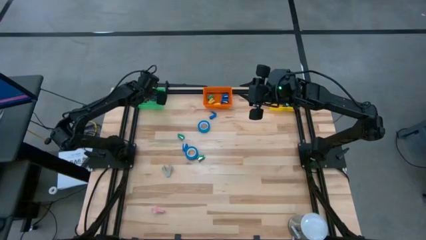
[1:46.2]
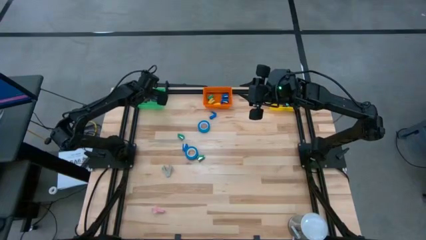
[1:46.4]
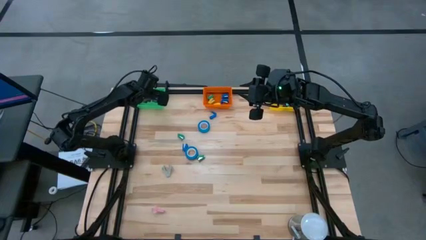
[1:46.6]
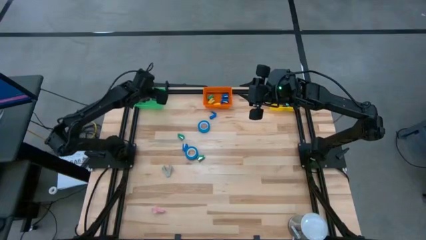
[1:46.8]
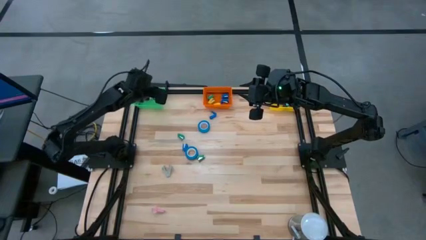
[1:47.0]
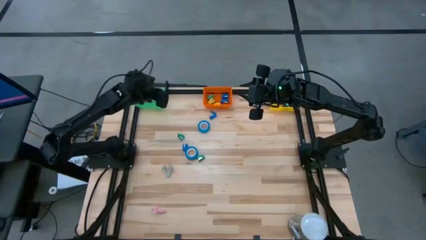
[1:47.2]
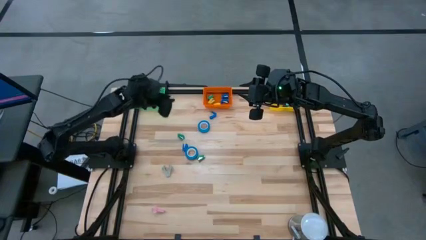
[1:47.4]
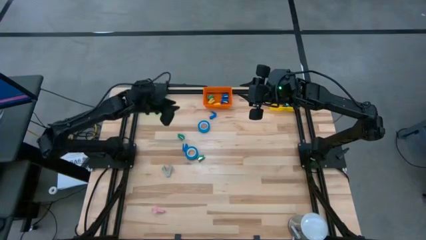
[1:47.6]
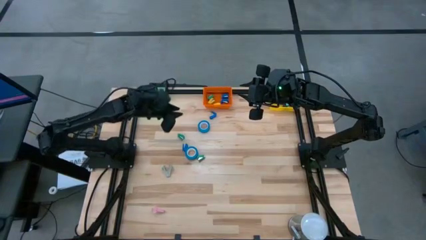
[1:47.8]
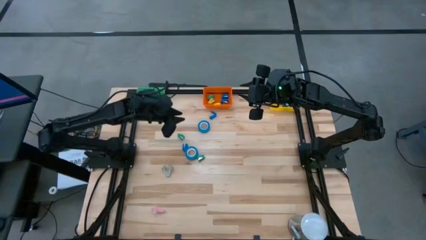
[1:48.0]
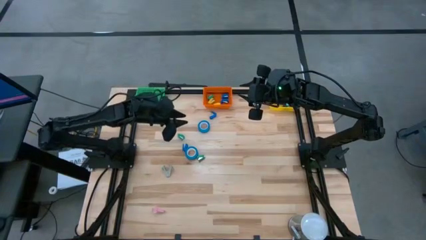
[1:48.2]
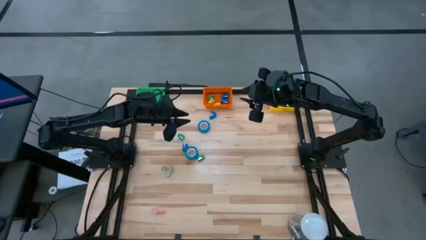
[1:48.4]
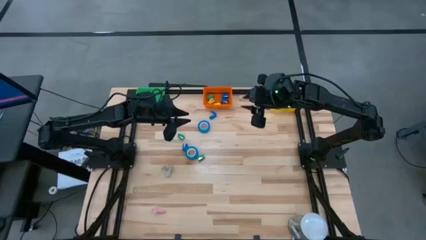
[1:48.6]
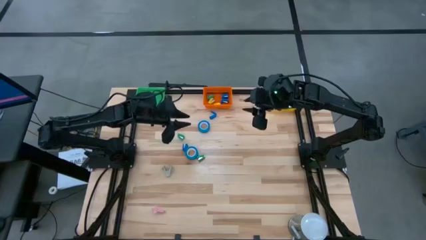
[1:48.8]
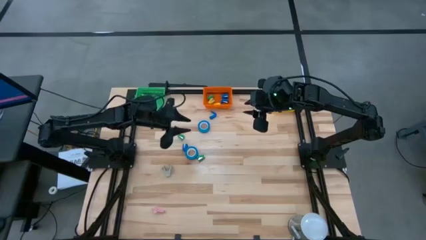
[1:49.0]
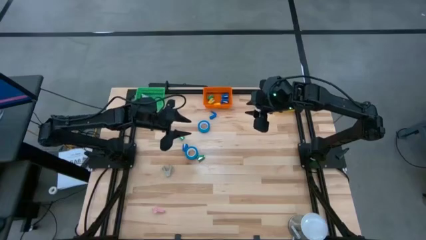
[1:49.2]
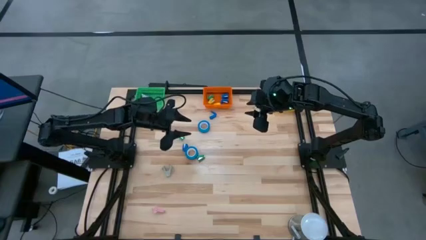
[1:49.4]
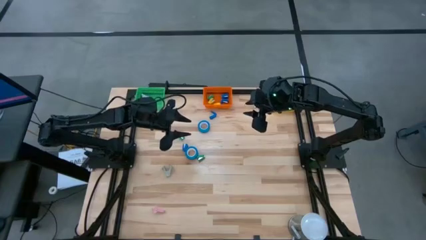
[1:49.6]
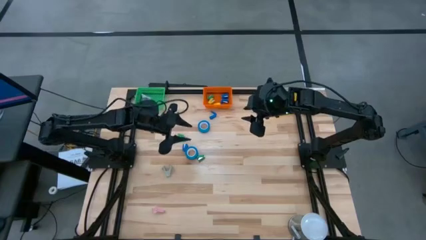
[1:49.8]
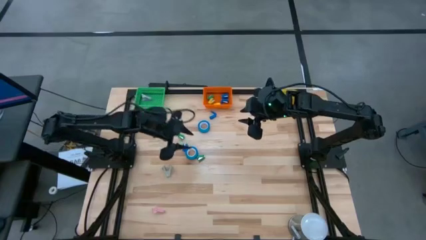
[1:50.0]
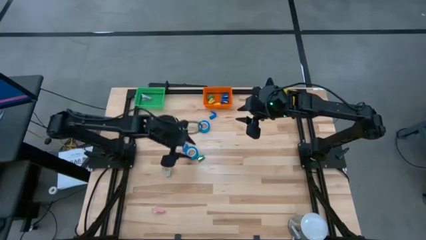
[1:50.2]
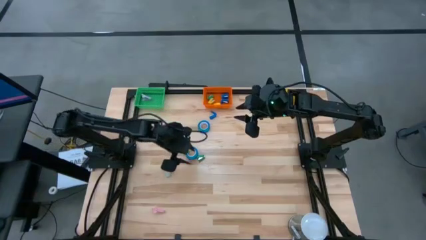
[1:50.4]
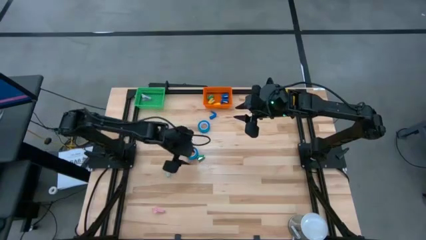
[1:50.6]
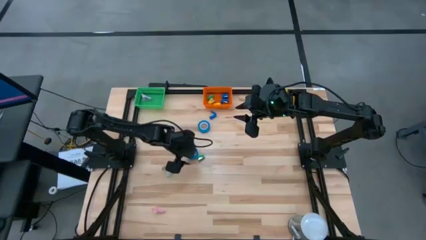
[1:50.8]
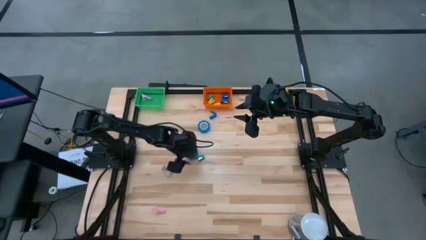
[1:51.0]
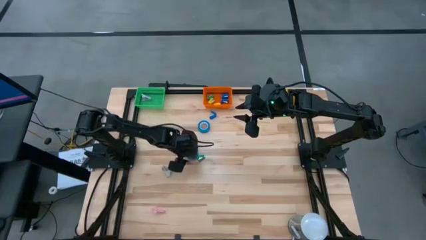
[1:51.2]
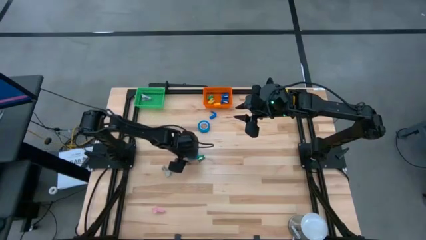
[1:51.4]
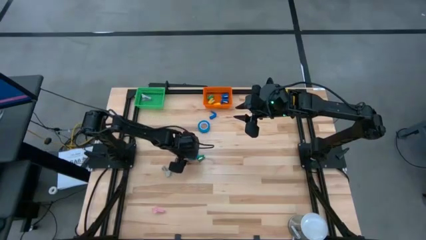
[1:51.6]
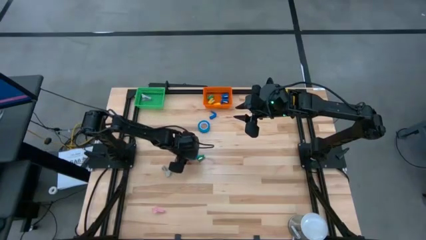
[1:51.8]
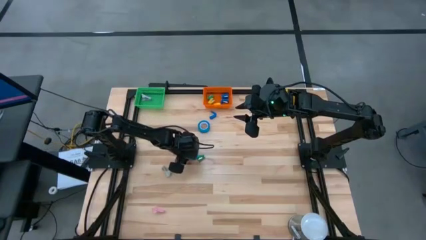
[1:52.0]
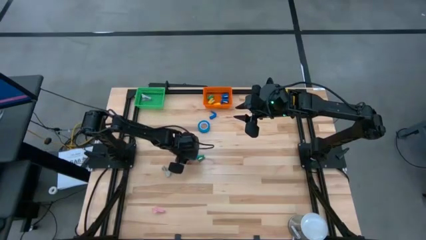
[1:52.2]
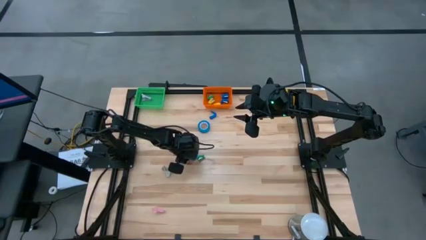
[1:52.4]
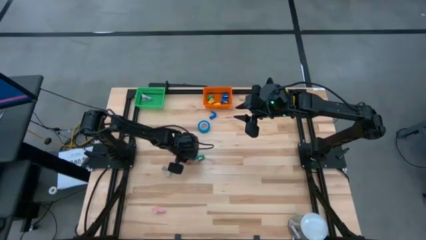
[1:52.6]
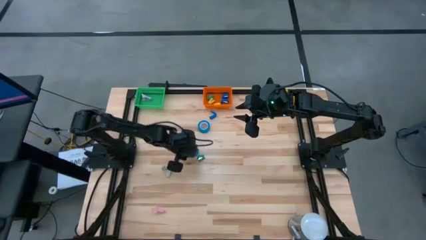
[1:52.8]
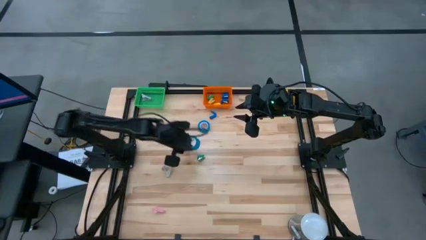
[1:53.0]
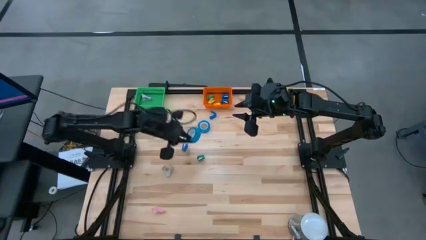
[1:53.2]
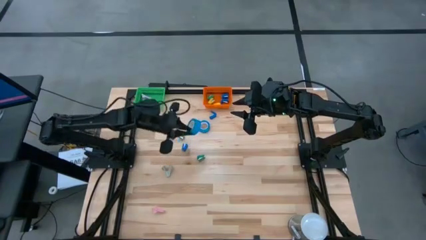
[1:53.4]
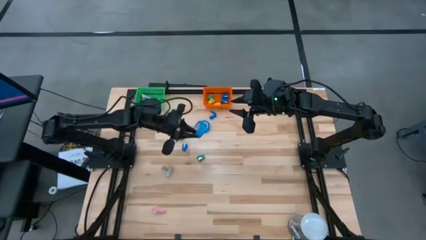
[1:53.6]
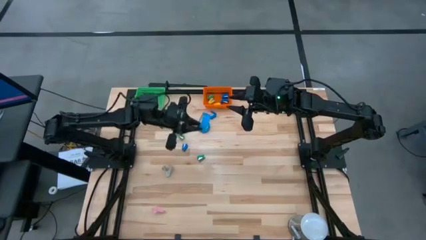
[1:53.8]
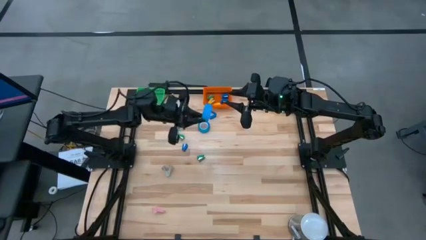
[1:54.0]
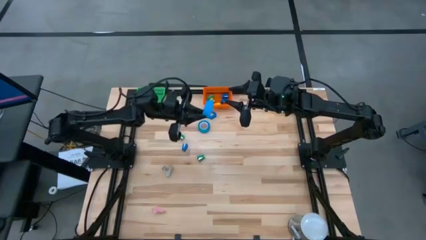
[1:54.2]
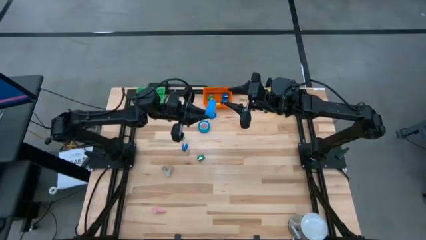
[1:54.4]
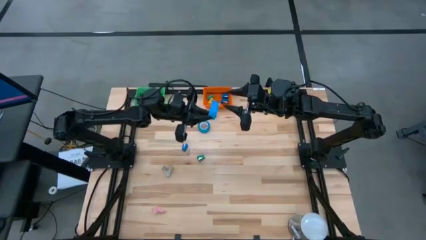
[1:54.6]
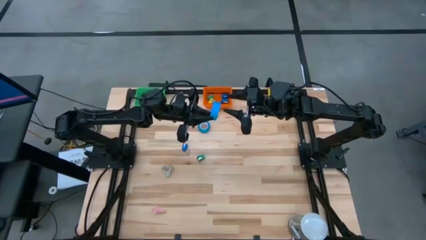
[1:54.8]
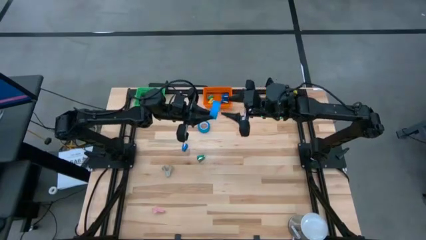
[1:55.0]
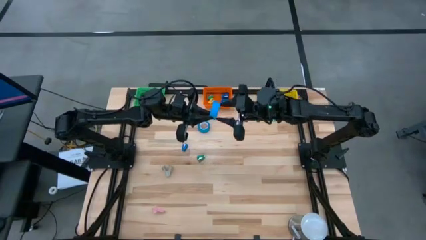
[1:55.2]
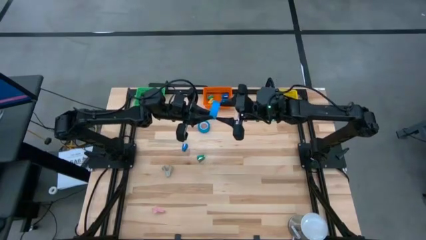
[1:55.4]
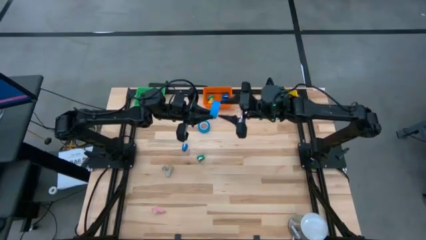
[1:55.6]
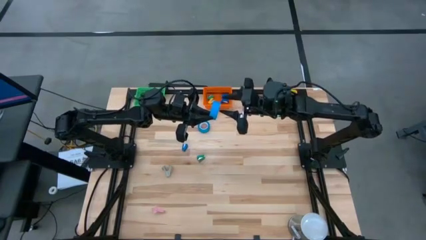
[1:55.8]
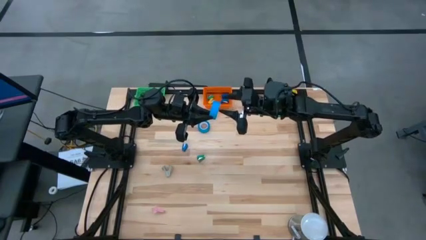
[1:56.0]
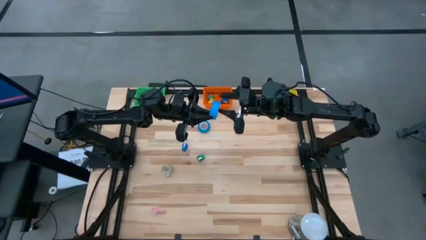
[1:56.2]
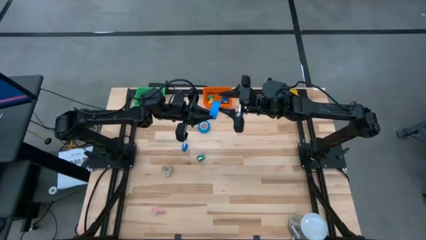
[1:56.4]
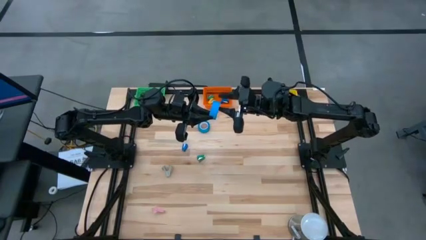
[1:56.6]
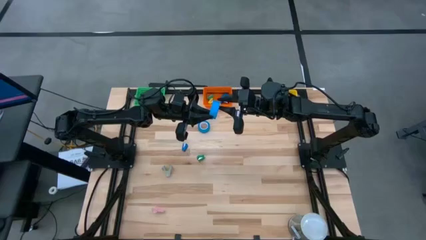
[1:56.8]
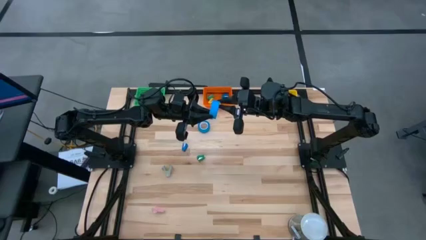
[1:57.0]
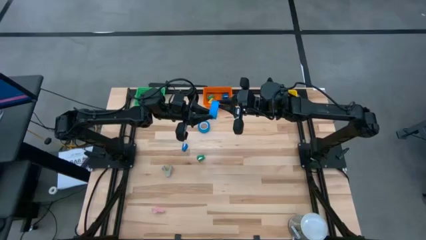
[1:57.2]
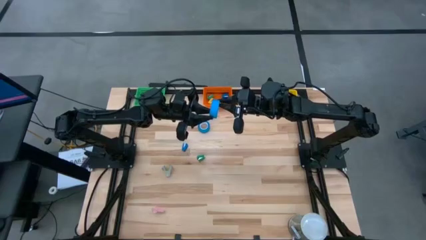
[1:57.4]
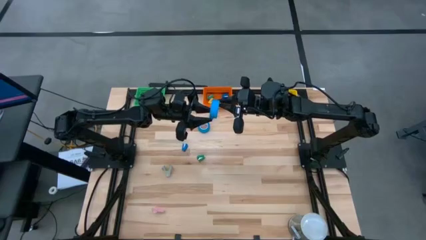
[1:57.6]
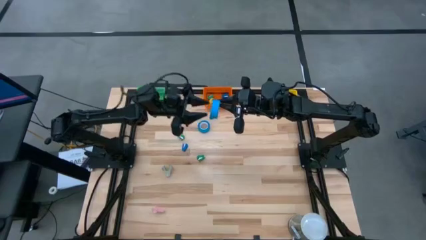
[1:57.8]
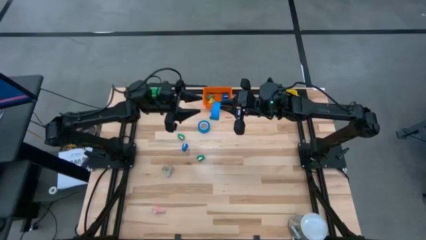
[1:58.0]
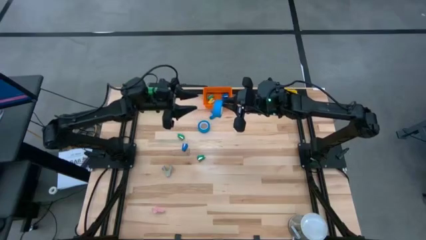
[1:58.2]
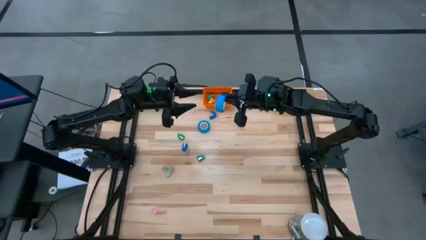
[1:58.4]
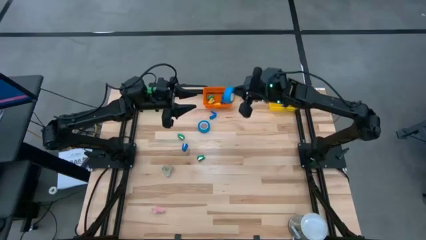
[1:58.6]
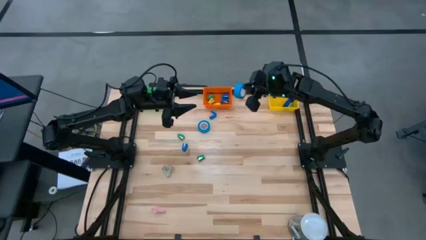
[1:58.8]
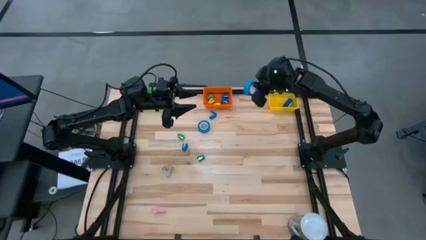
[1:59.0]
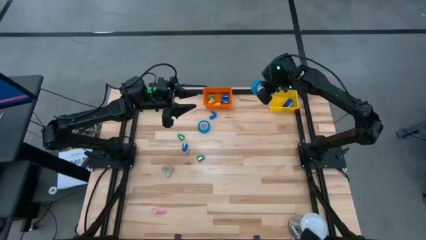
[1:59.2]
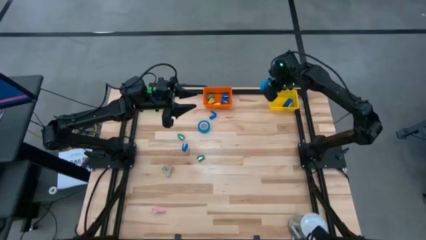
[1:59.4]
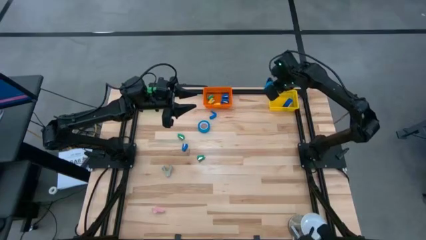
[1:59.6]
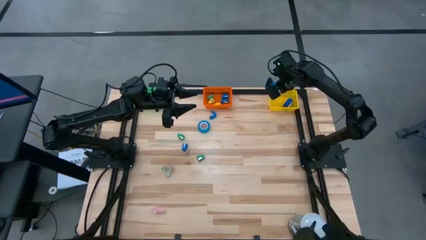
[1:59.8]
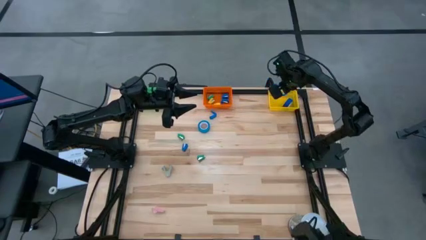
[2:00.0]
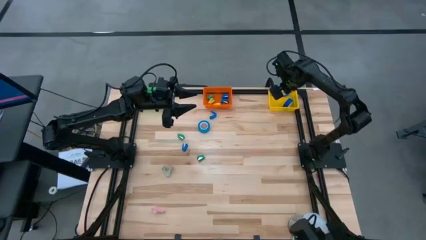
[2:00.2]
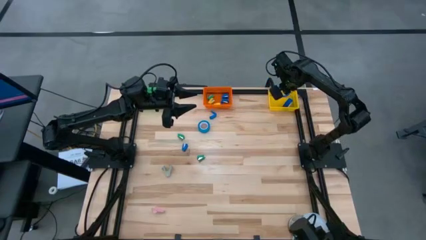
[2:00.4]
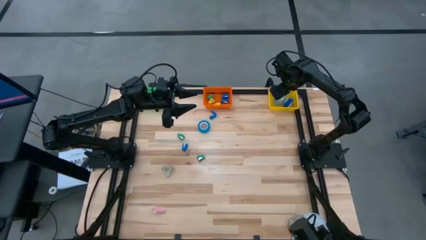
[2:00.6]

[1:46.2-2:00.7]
Task: Pick and place Stapler, Stapler remover, tape
Put the light blue tape into the yellow bin

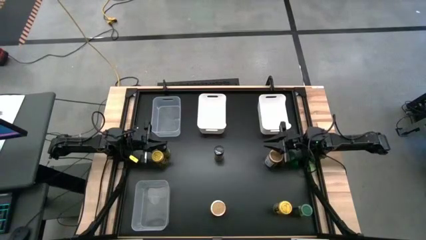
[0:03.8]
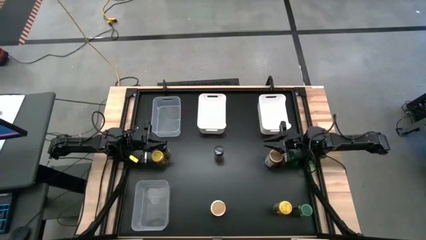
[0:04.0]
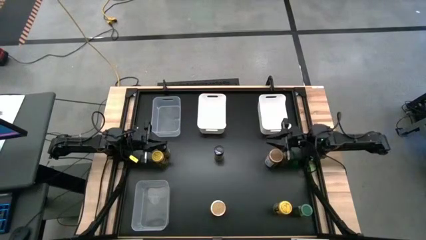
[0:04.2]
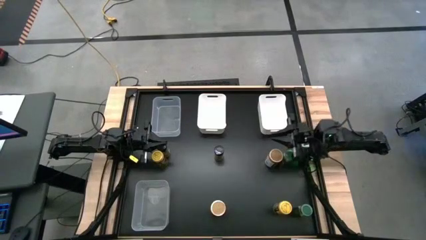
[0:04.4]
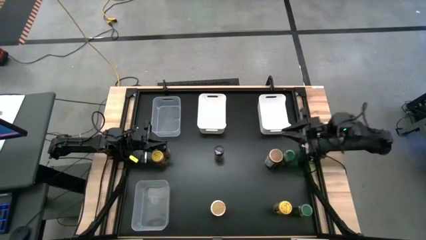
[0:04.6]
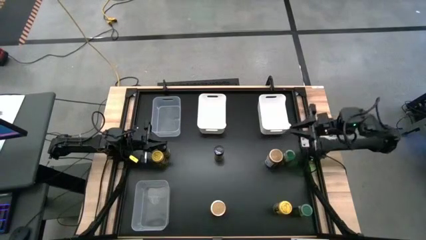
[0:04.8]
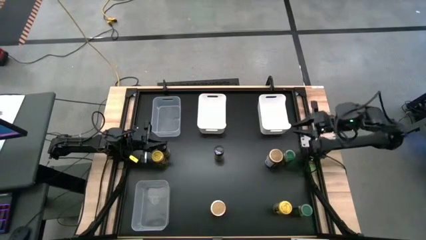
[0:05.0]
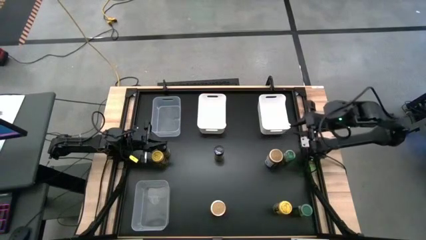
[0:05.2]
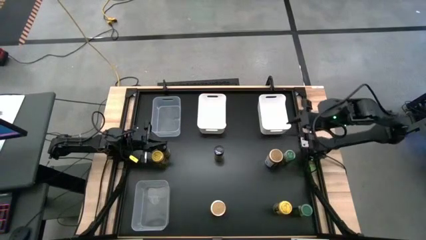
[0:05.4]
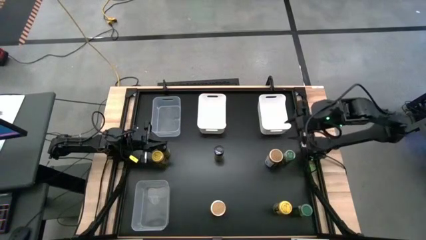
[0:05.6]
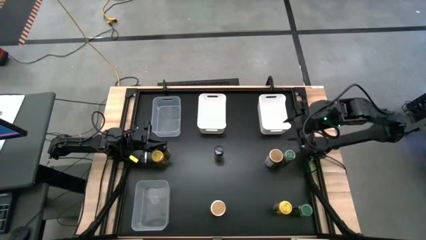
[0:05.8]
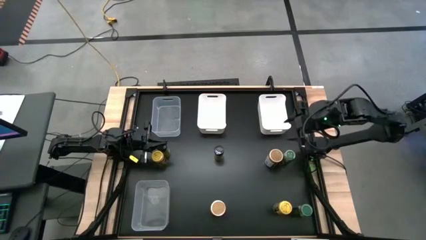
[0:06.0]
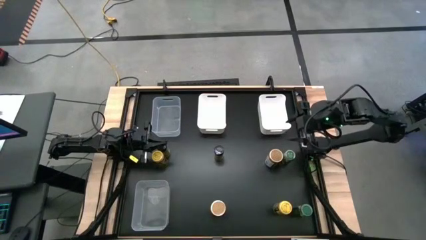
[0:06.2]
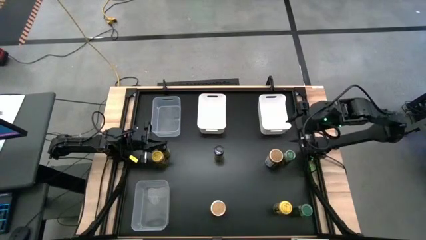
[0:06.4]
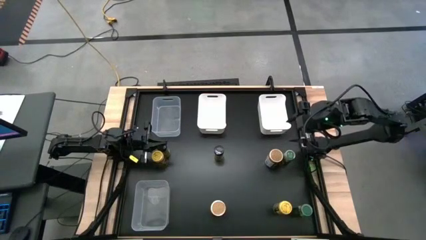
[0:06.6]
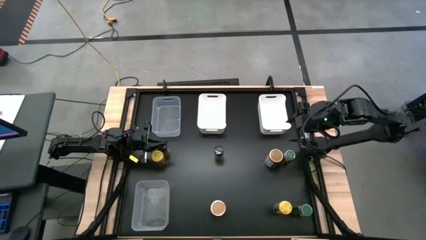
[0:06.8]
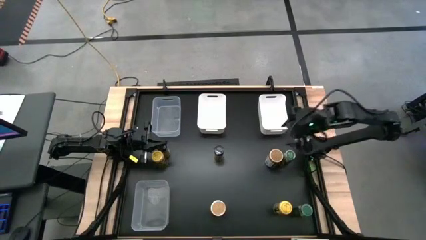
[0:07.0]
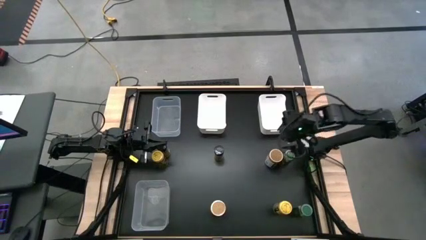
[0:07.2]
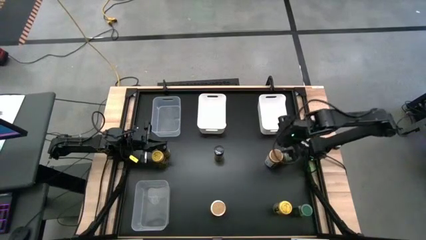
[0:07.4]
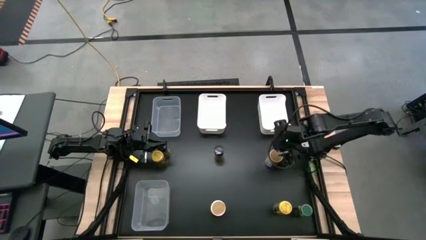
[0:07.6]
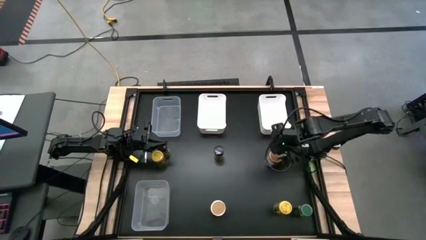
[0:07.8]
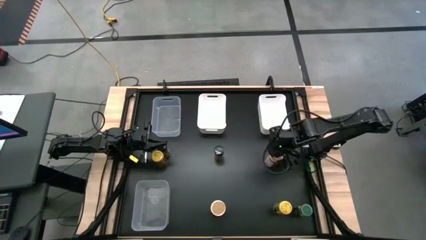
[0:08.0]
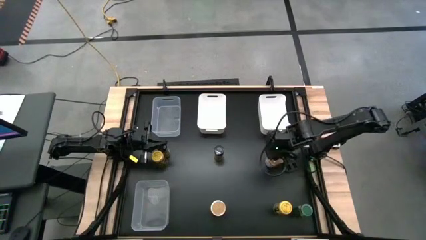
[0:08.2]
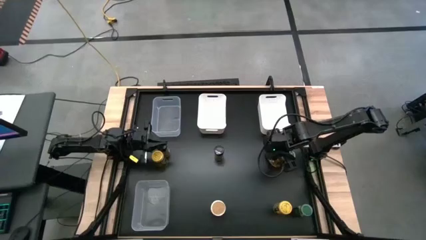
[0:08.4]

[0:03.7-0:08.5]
Task: Sort spices by type
Put the top gold spice bottle into the left white bin
